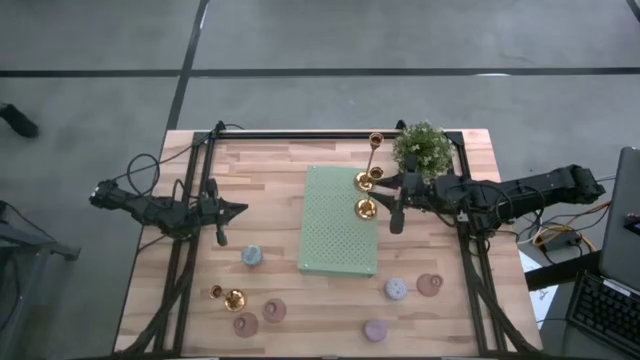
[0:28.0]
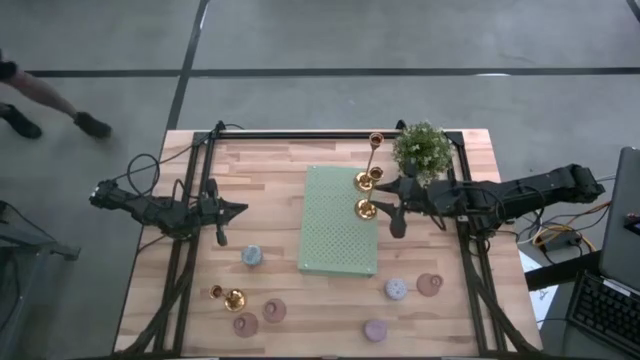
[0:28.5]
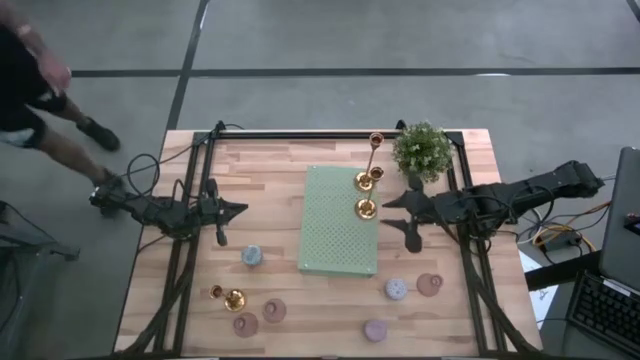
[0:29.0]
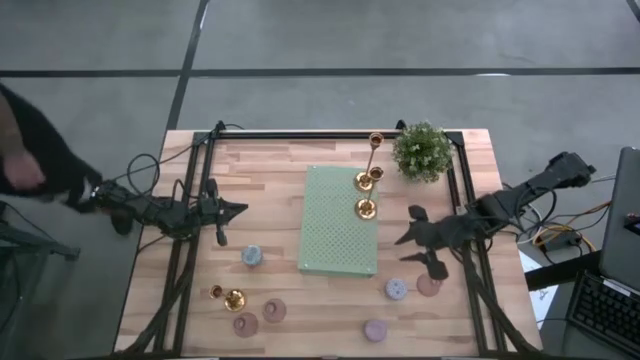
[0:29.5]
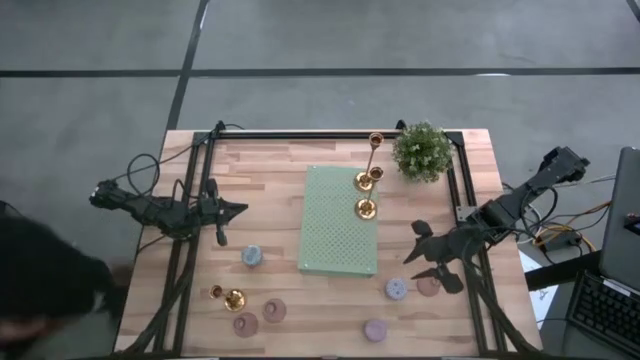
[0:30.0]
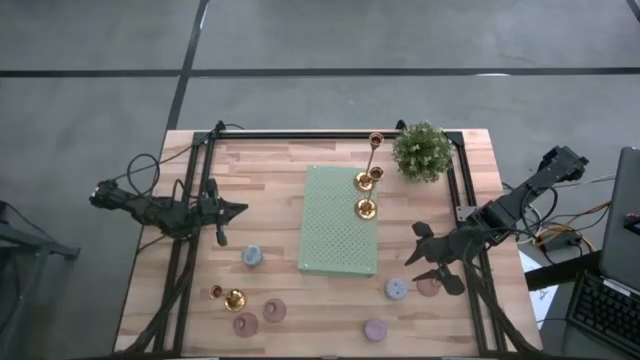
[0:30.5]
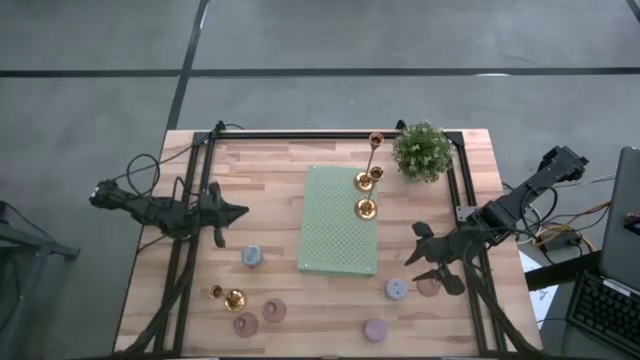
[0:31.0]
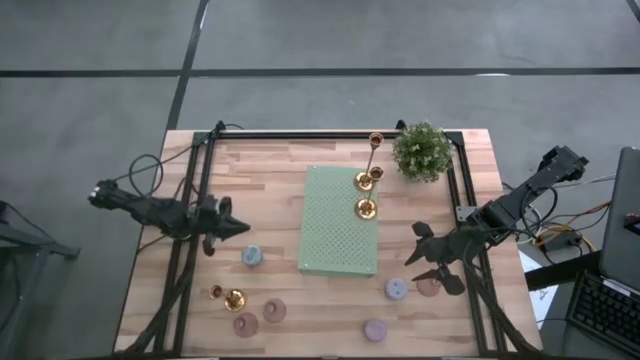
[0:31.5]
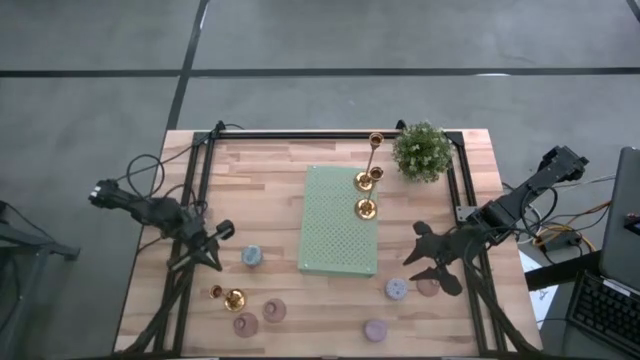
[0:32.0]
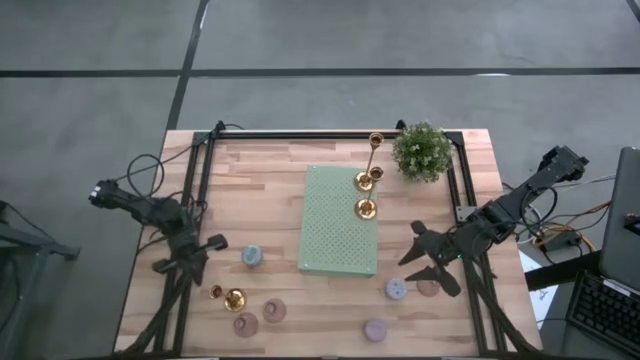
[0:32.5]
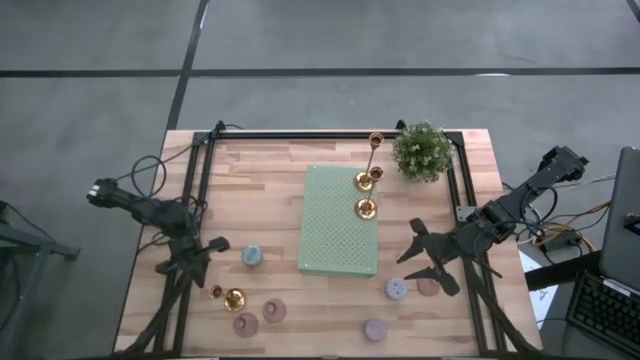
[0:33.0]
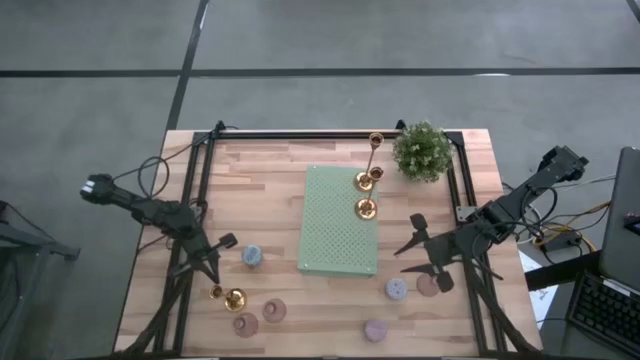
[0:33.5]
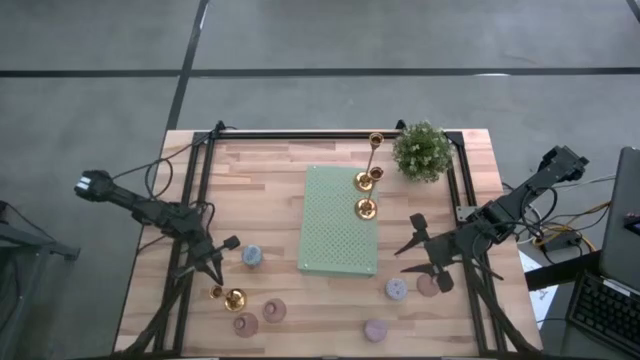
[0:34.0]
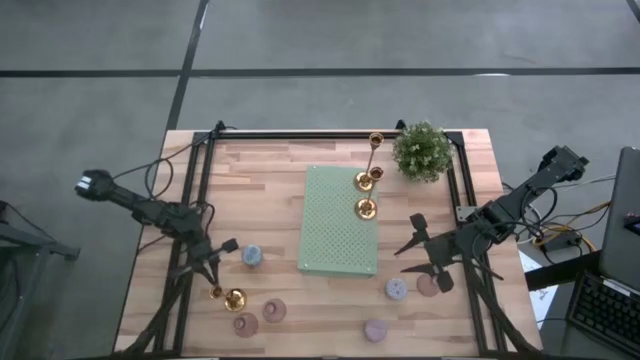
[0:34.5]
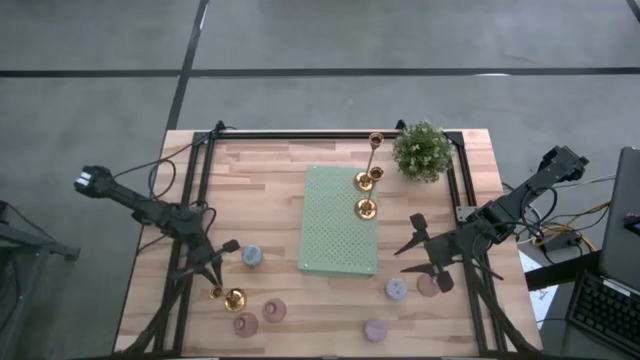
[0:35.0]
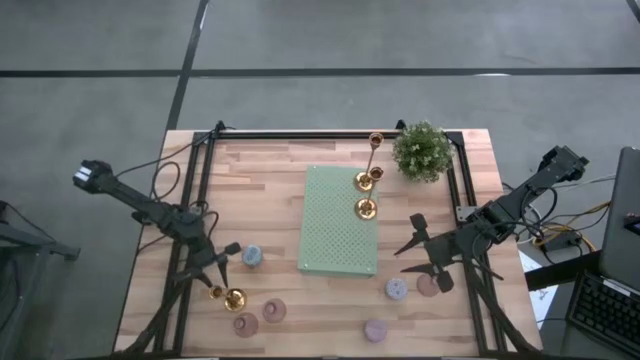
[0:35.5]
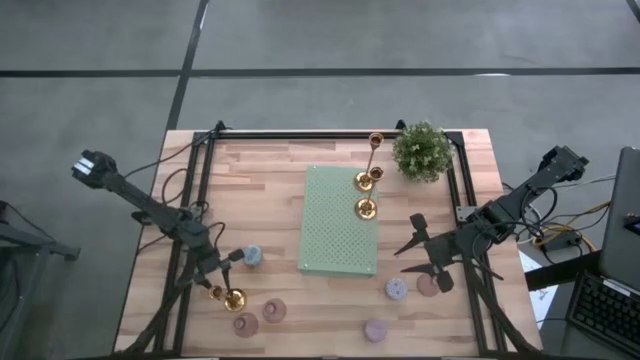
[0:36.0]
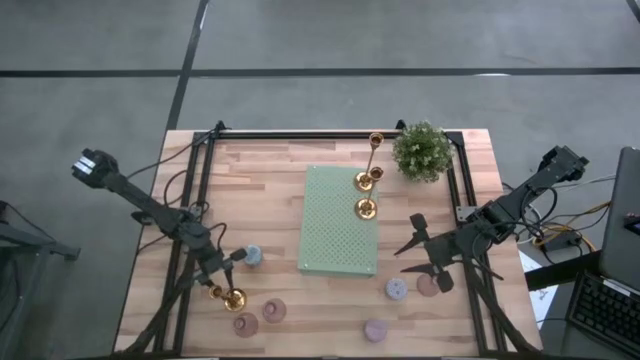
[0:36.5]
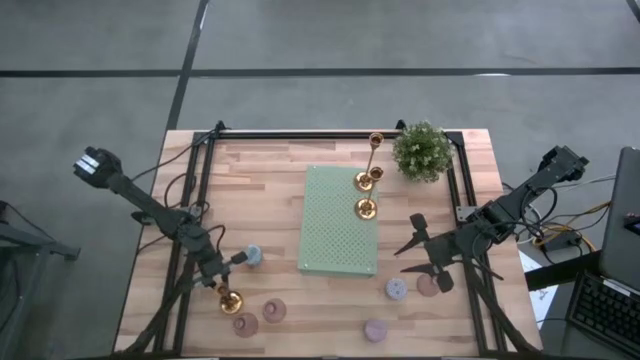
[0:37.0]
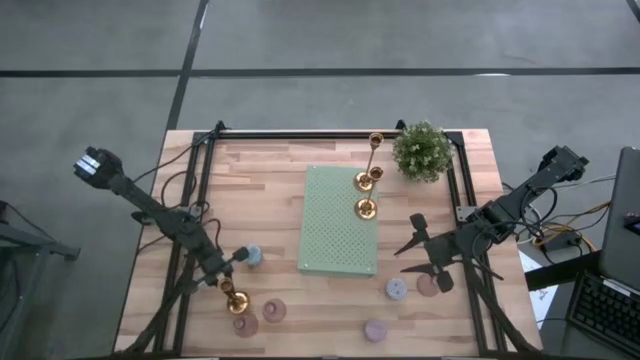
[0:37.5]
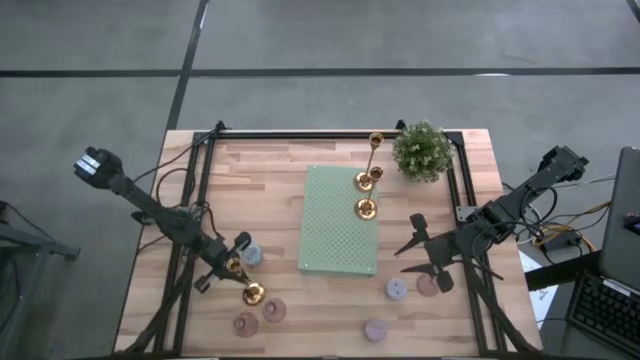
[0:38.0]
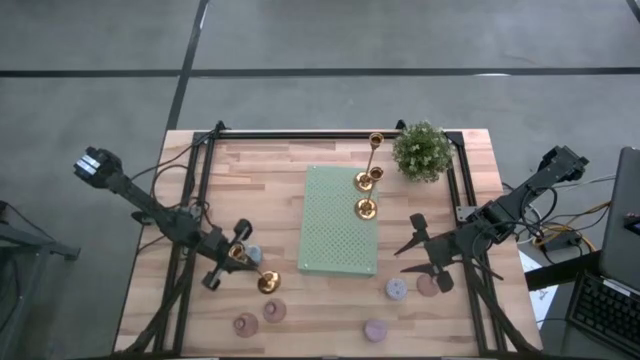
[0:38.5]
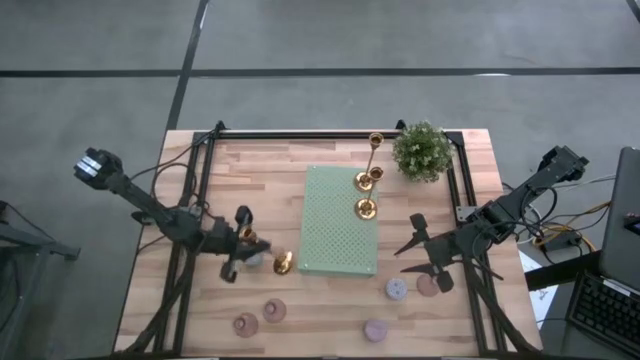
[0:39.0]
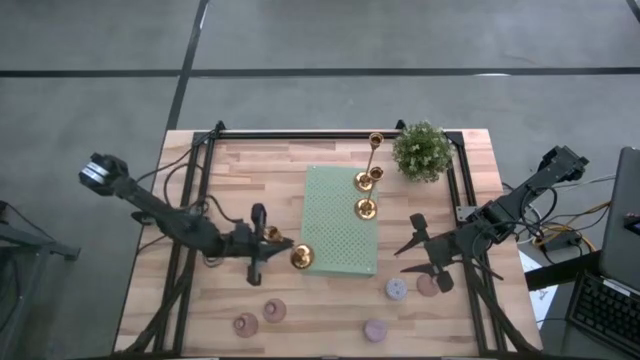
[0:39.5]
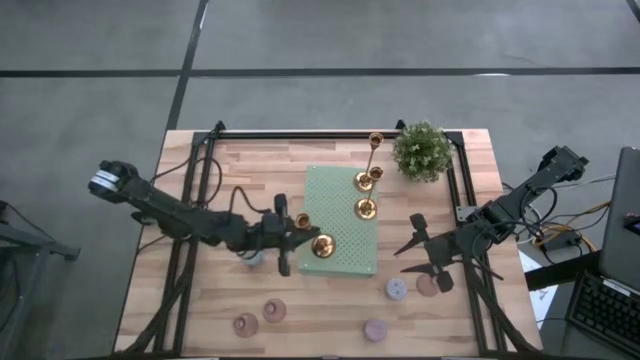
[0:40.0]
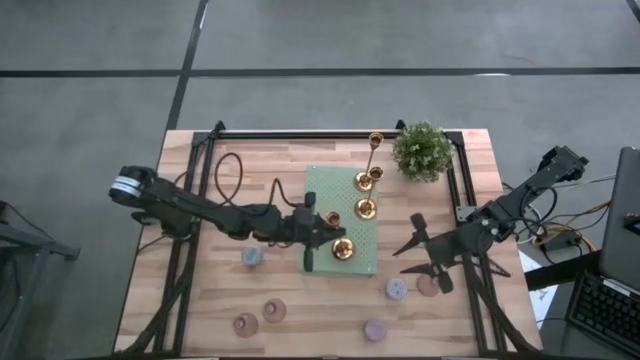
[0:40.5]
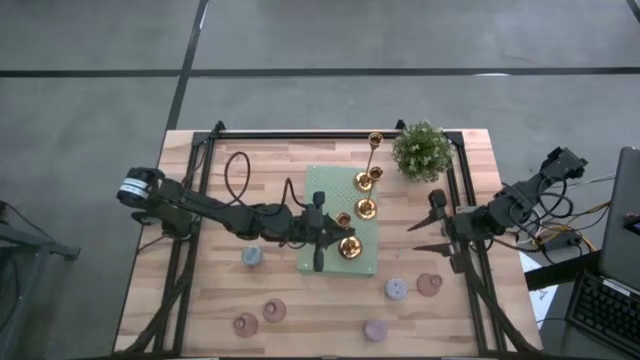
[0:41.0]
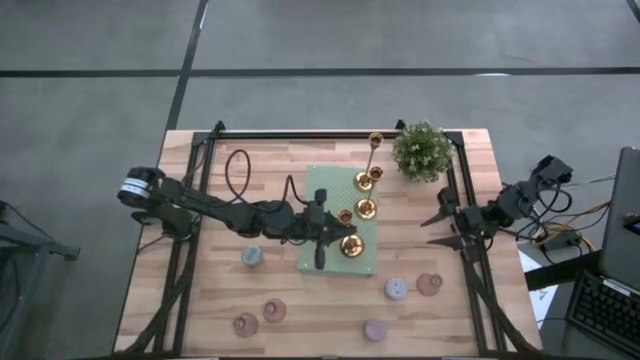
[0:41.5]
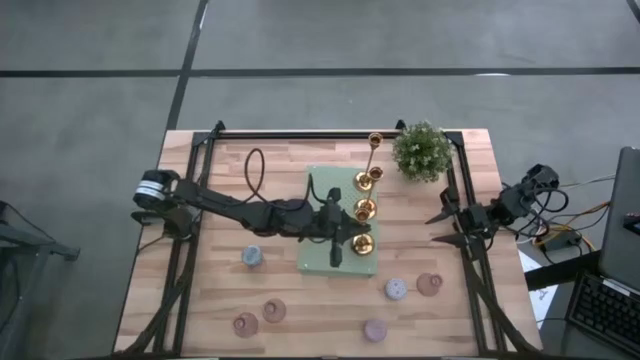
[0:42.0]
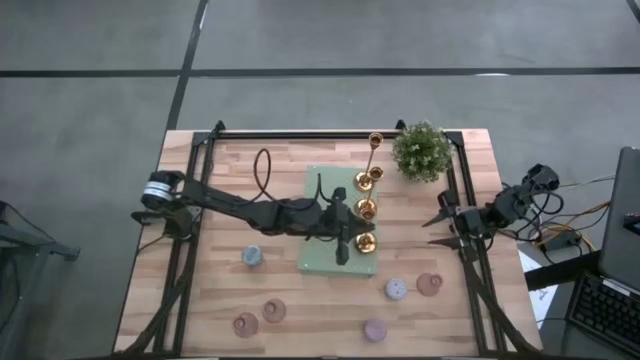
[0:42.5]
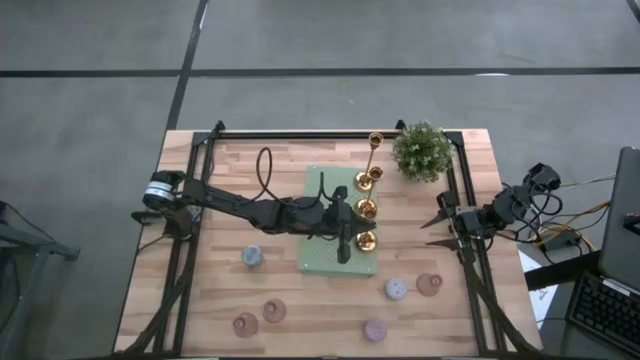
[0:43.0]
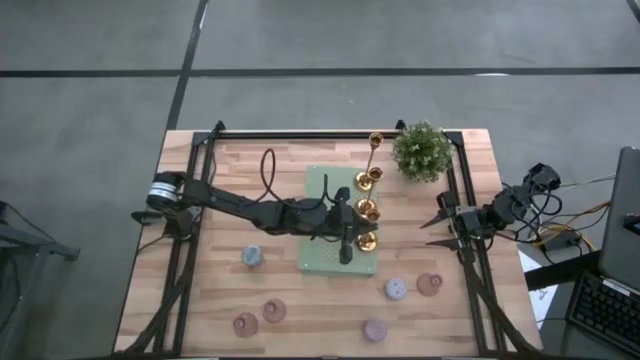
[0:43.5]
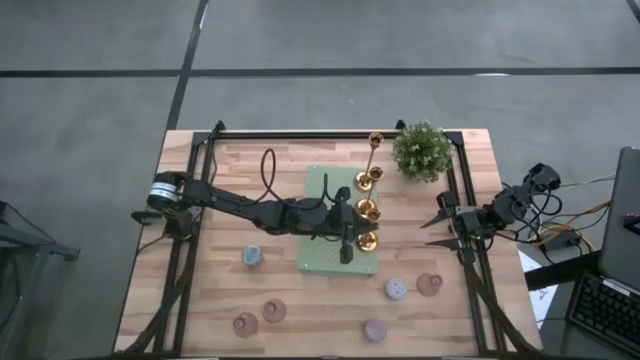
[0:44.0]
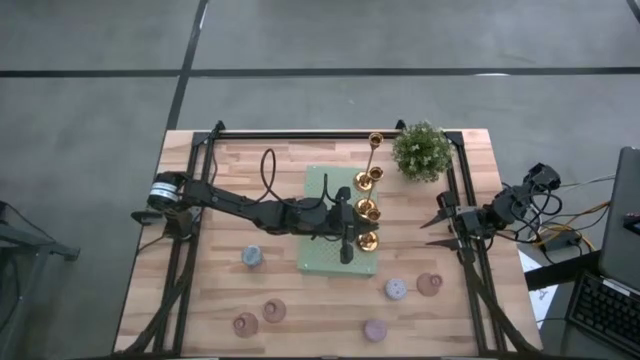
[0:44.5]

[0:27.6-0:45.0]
Task: Pick & Place candle stick holders
Put the gold candle holder on the shelf aligned with the other gold candle holder

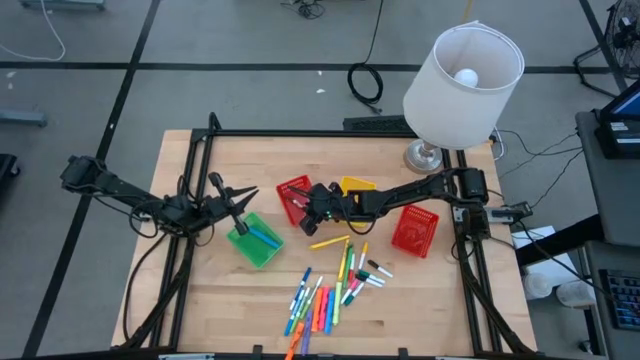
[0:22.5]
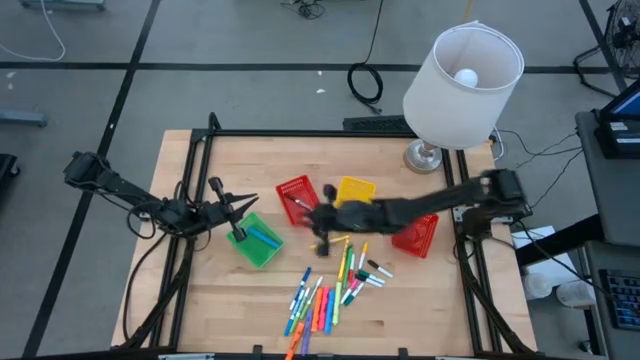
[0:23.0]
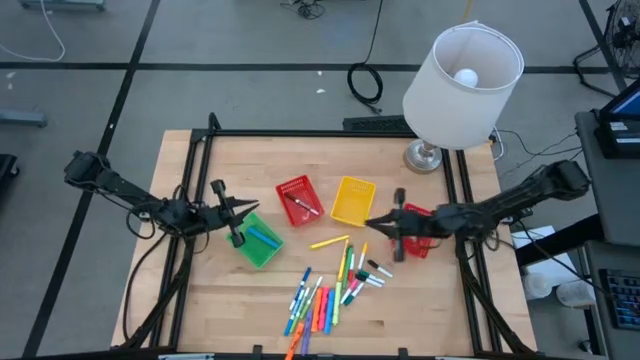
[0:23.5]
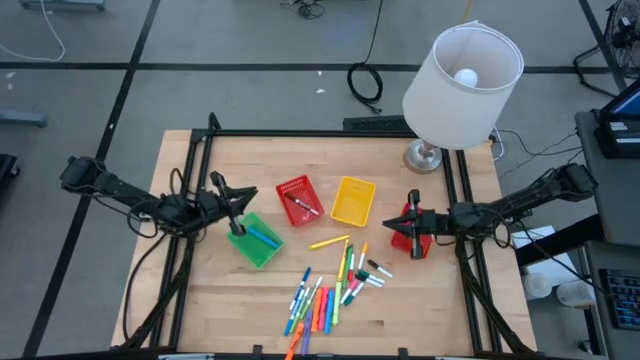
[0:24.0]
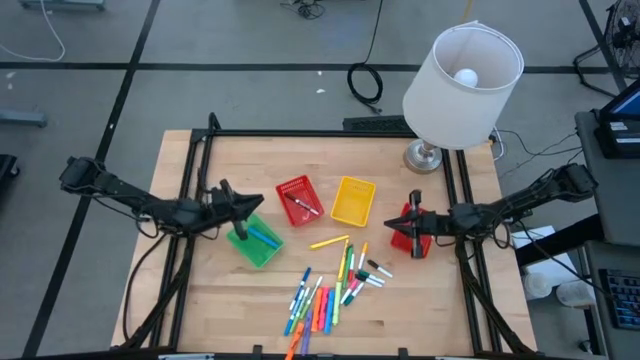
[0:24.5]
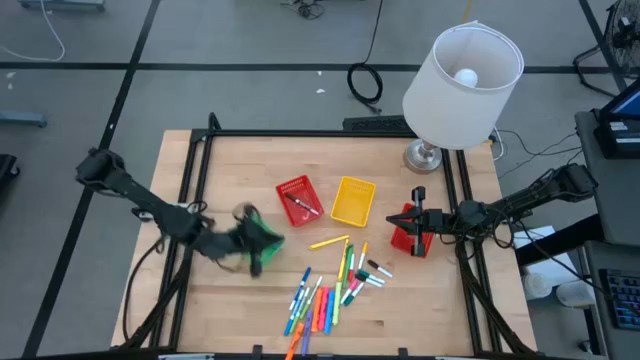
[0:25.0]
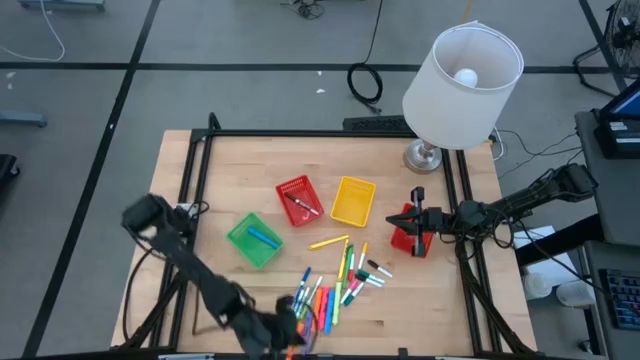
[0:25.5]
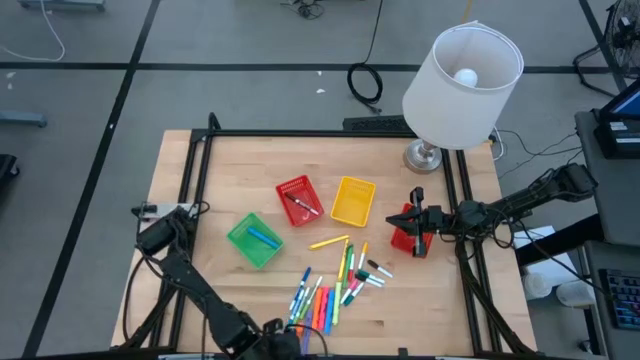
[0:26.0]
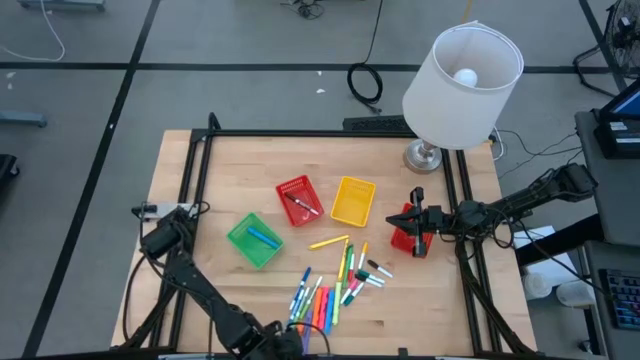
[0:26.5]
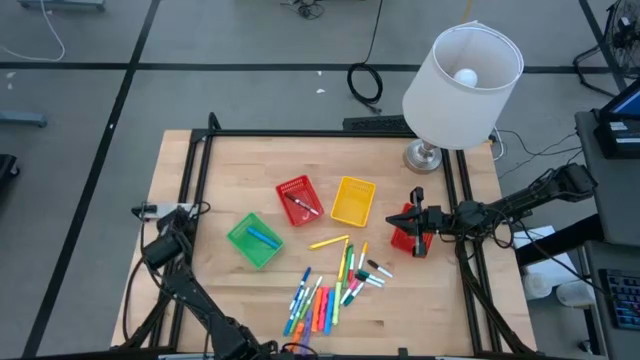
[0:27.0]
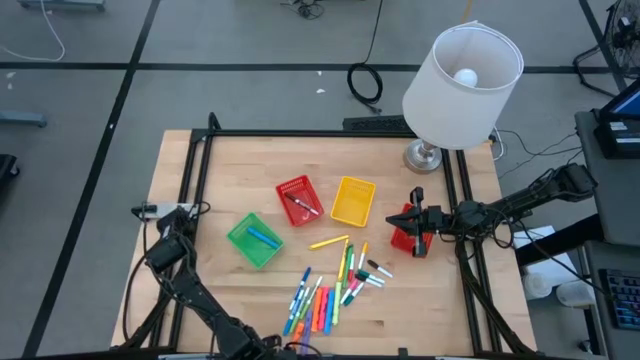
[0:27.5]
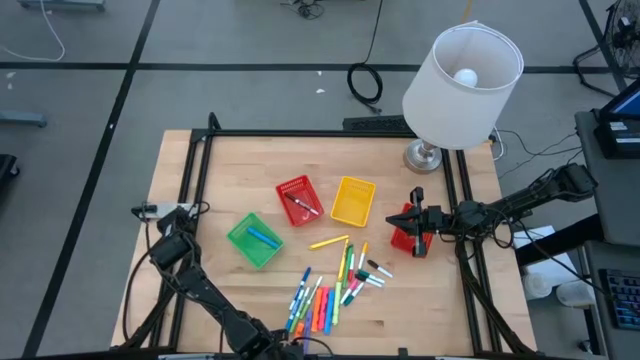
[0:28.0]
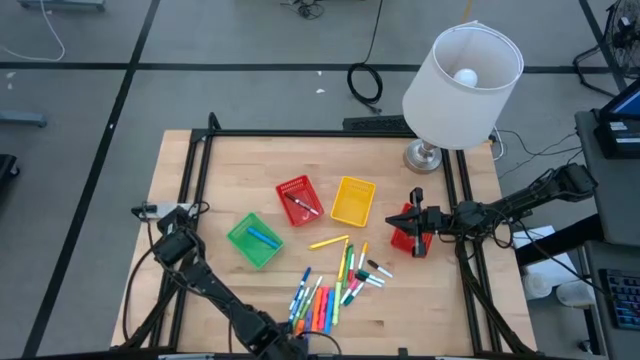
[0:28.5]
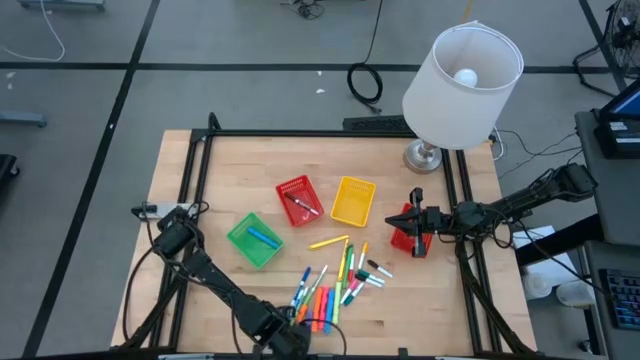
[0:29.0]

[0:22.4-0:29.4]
Task: Pick & Place Markers
Adjust the highlighters on the table
